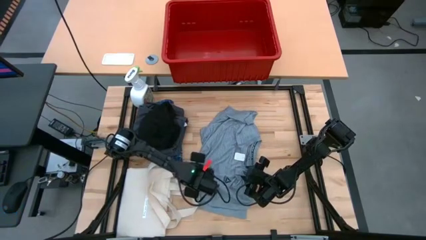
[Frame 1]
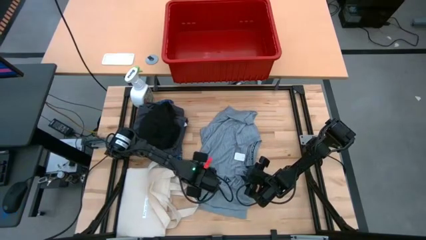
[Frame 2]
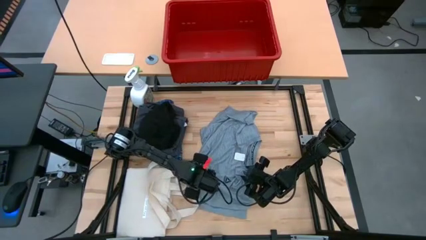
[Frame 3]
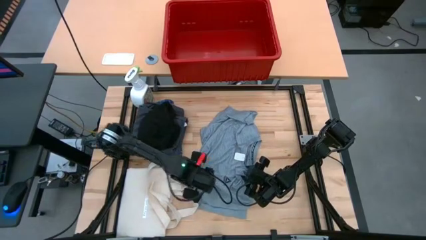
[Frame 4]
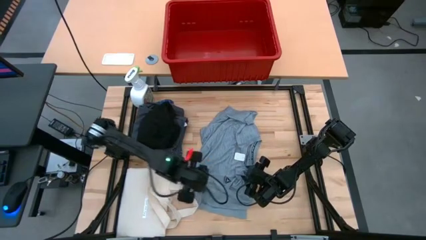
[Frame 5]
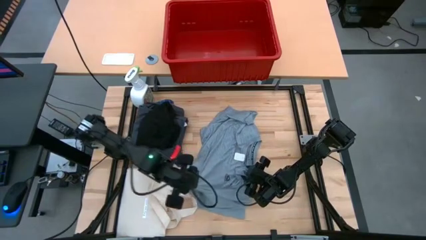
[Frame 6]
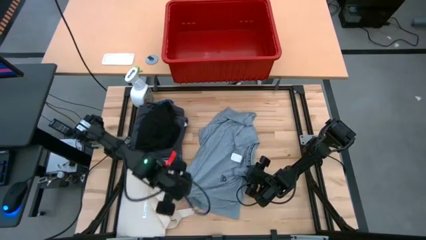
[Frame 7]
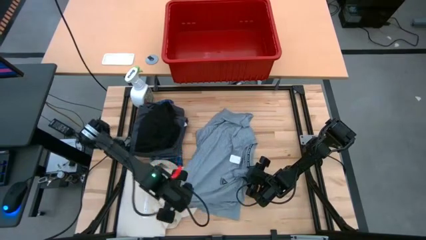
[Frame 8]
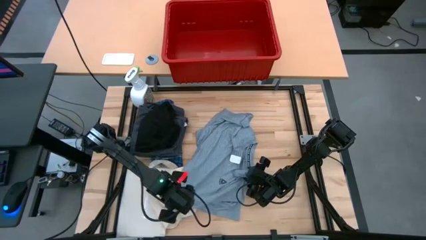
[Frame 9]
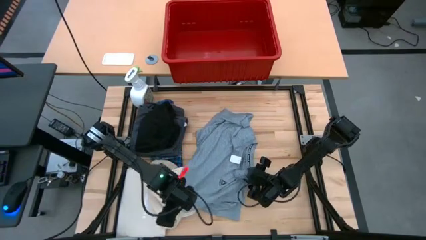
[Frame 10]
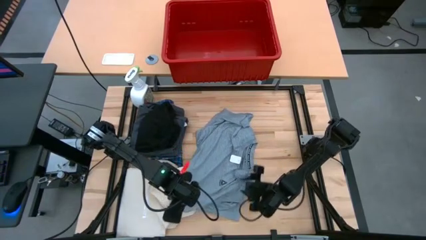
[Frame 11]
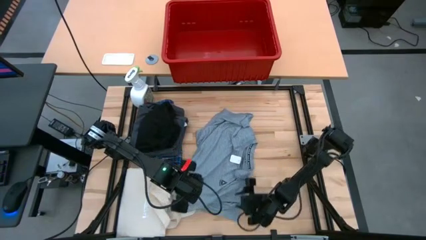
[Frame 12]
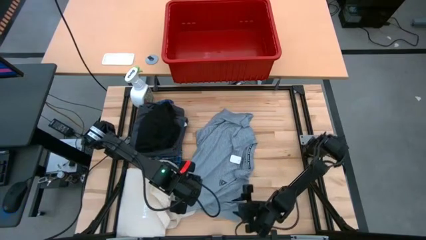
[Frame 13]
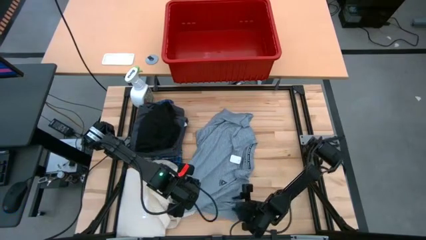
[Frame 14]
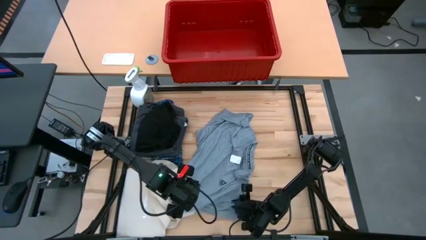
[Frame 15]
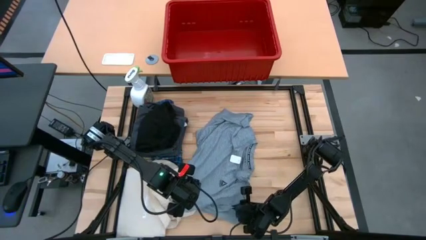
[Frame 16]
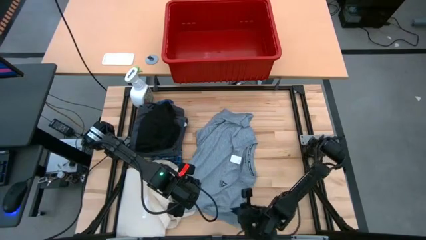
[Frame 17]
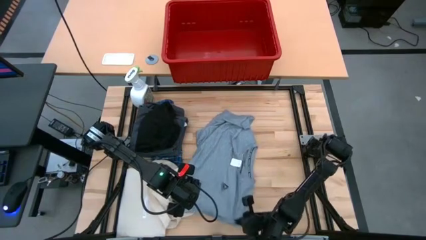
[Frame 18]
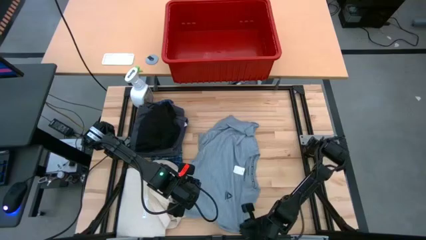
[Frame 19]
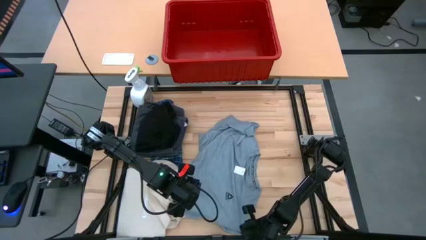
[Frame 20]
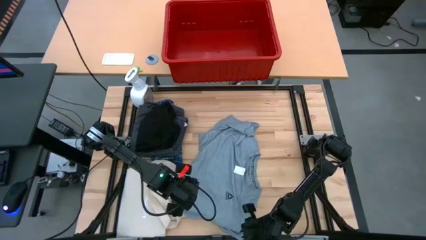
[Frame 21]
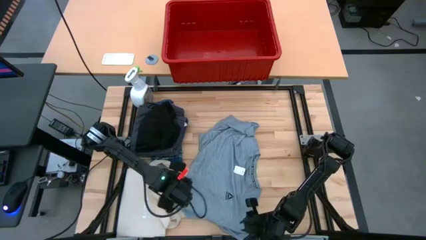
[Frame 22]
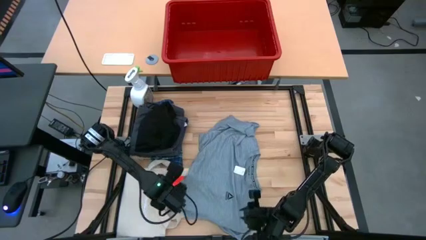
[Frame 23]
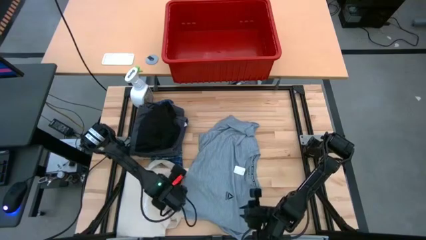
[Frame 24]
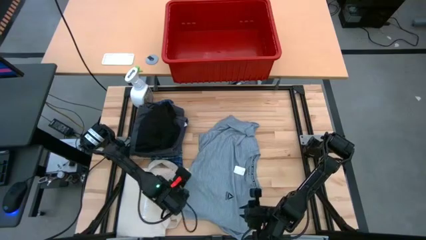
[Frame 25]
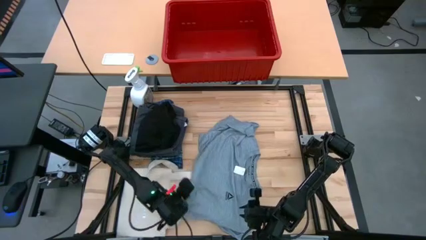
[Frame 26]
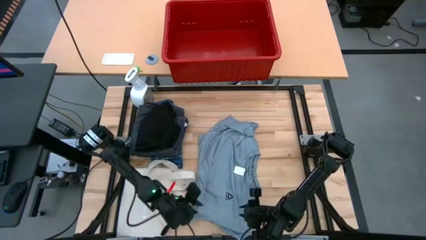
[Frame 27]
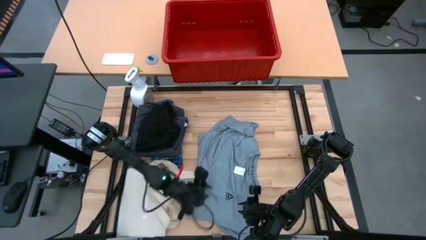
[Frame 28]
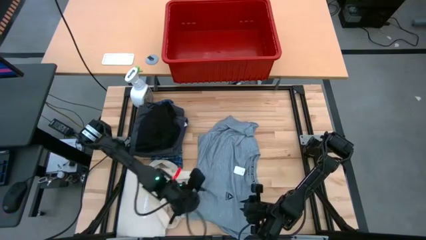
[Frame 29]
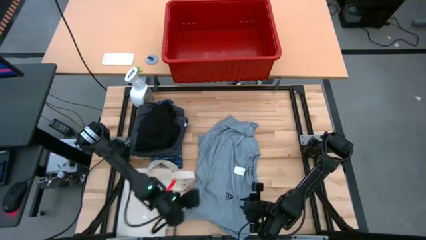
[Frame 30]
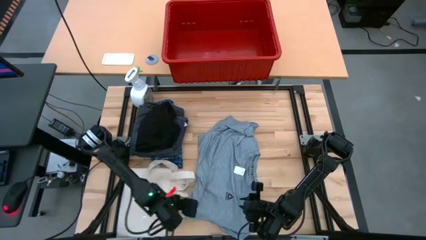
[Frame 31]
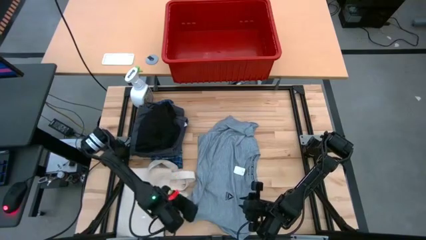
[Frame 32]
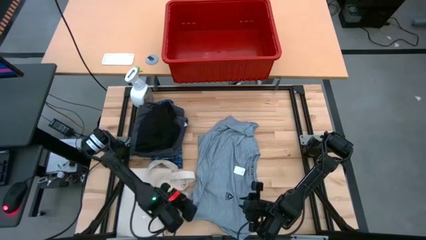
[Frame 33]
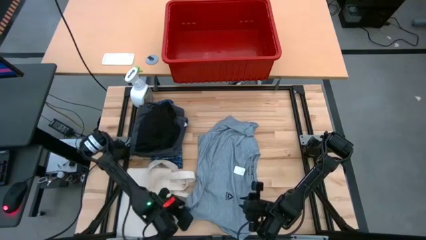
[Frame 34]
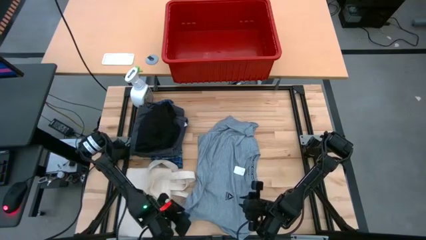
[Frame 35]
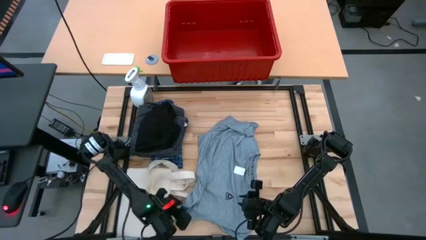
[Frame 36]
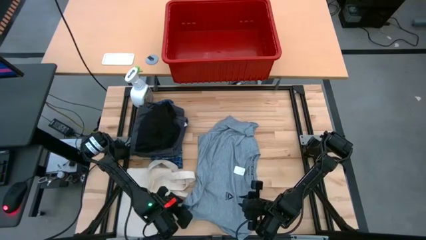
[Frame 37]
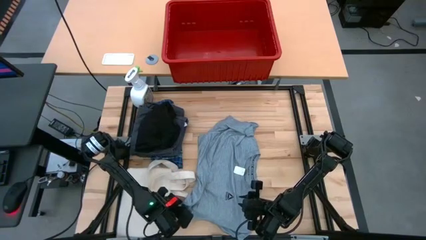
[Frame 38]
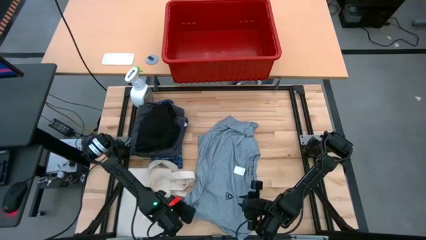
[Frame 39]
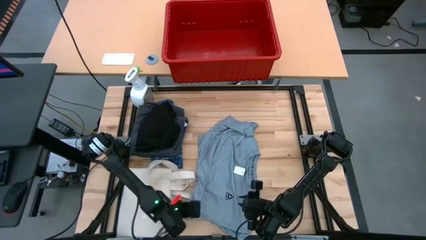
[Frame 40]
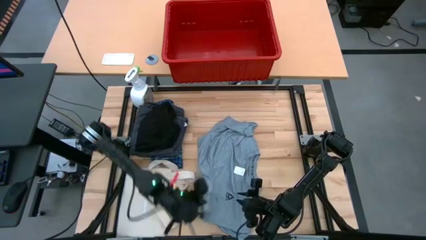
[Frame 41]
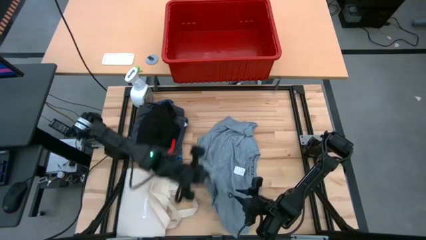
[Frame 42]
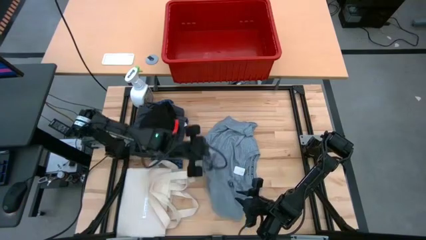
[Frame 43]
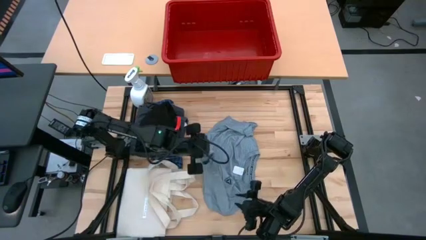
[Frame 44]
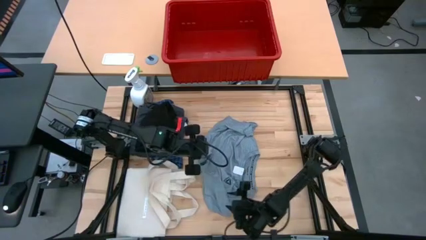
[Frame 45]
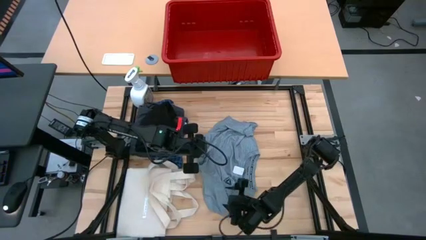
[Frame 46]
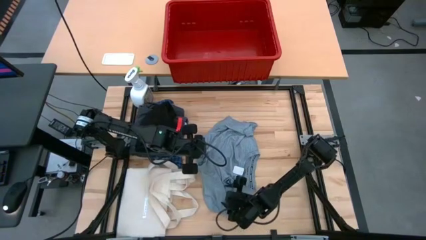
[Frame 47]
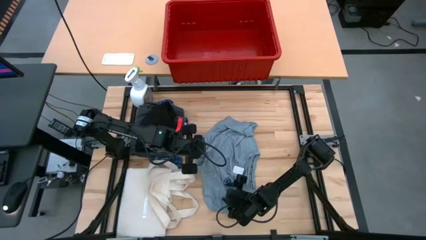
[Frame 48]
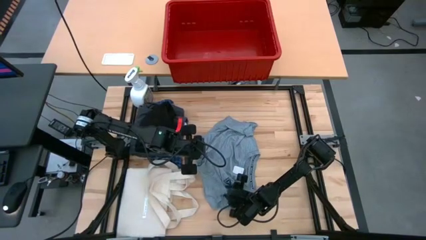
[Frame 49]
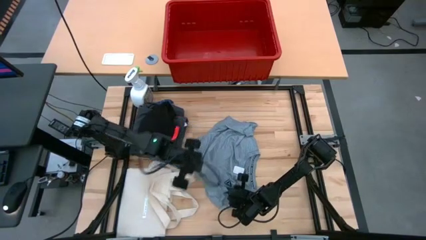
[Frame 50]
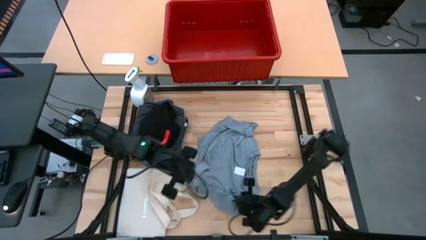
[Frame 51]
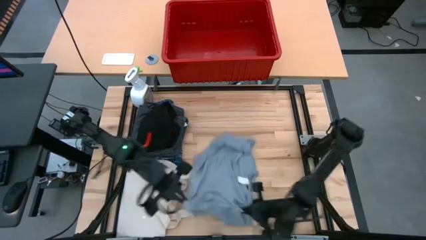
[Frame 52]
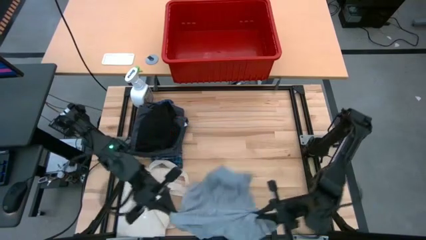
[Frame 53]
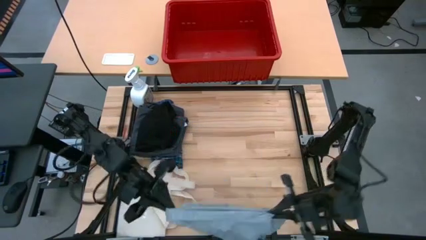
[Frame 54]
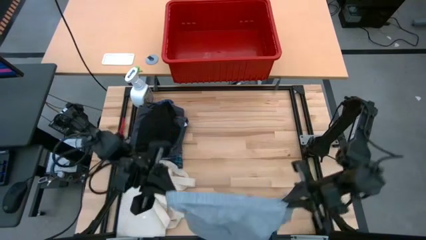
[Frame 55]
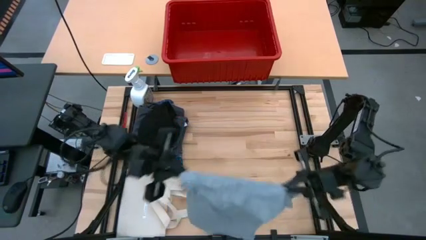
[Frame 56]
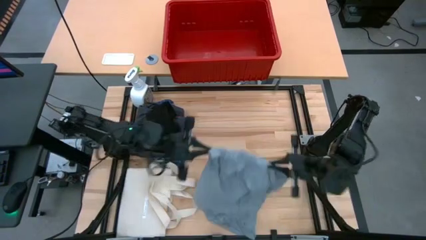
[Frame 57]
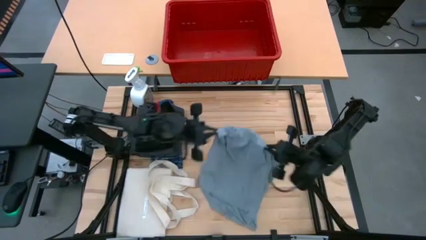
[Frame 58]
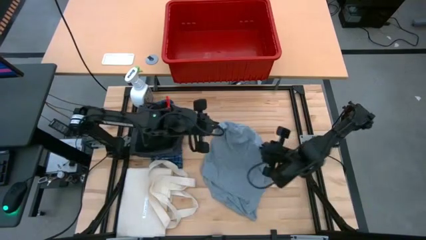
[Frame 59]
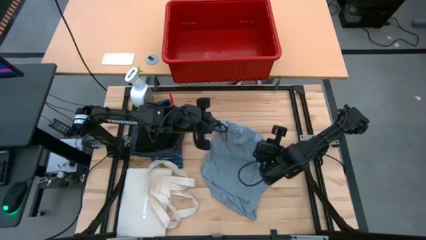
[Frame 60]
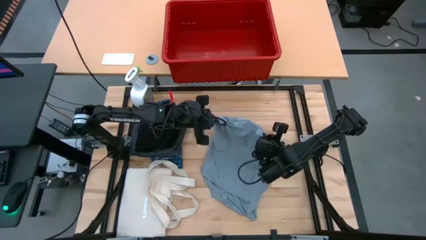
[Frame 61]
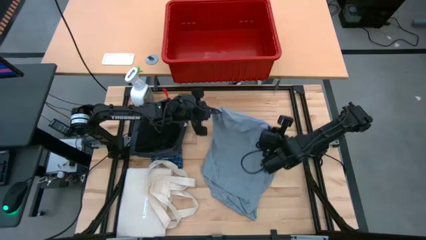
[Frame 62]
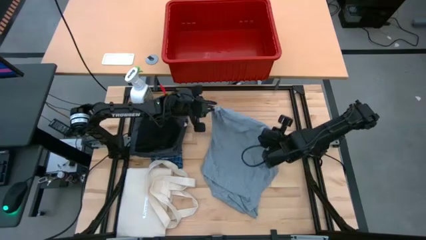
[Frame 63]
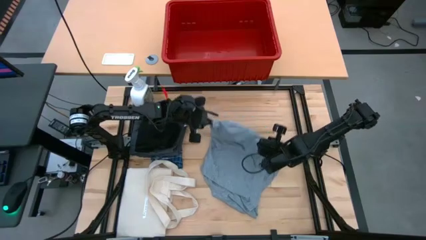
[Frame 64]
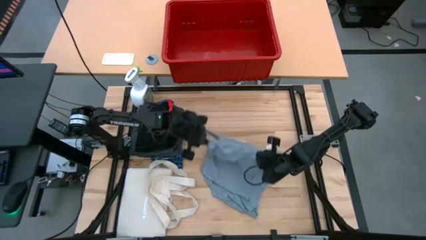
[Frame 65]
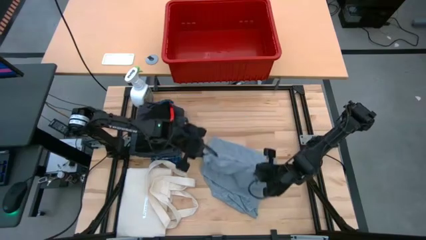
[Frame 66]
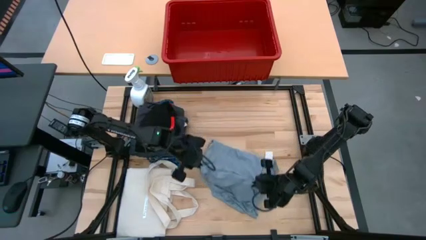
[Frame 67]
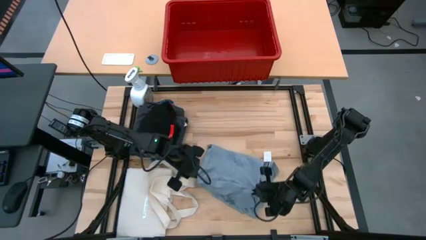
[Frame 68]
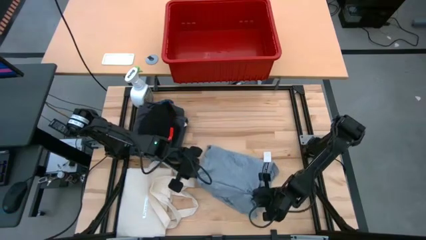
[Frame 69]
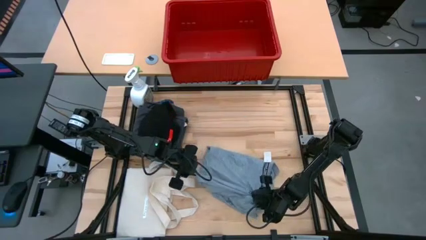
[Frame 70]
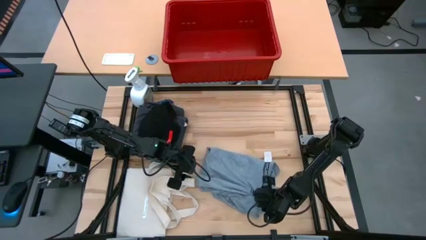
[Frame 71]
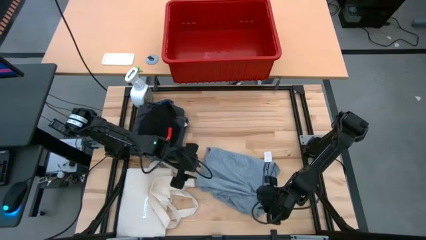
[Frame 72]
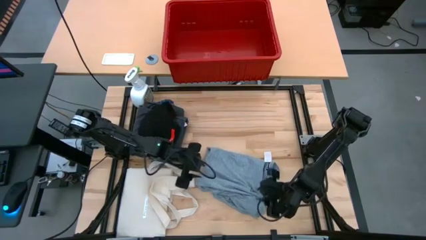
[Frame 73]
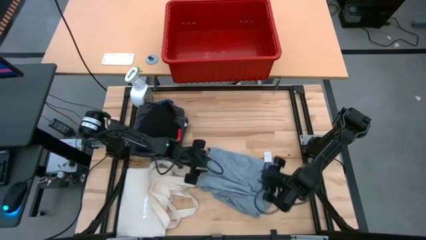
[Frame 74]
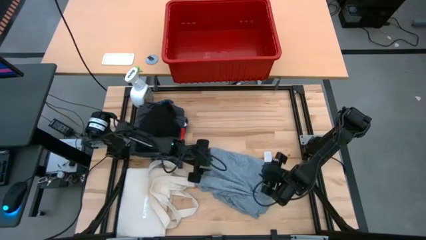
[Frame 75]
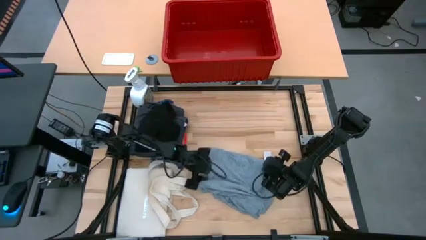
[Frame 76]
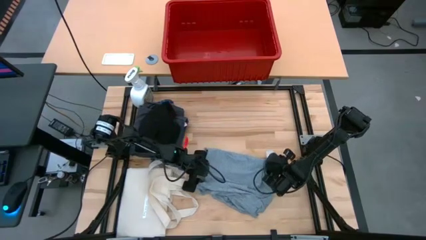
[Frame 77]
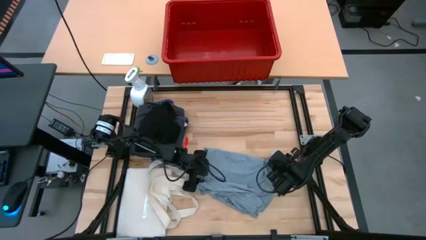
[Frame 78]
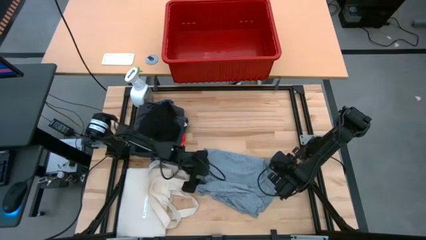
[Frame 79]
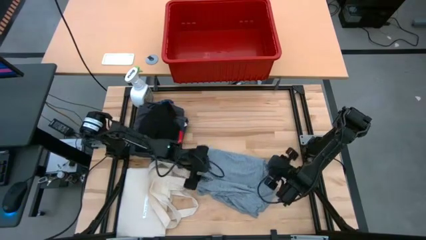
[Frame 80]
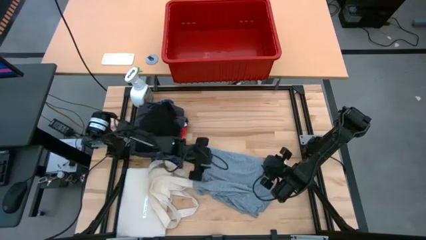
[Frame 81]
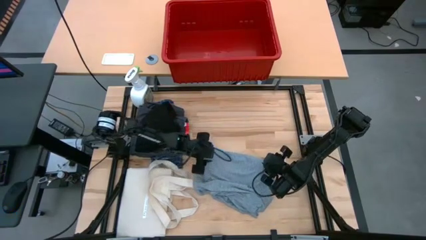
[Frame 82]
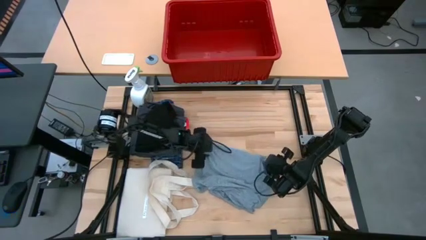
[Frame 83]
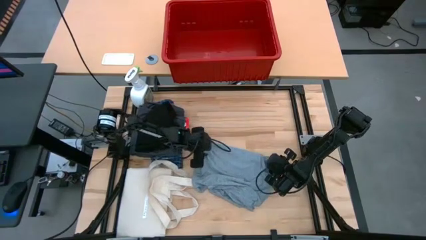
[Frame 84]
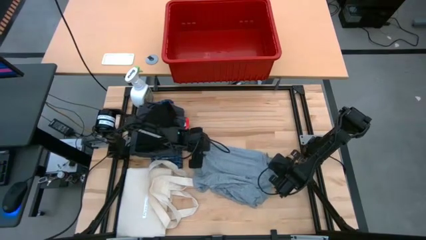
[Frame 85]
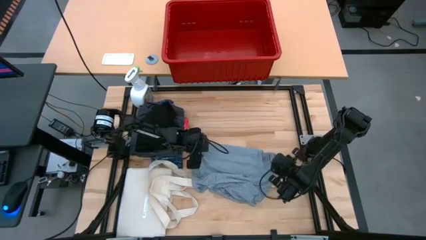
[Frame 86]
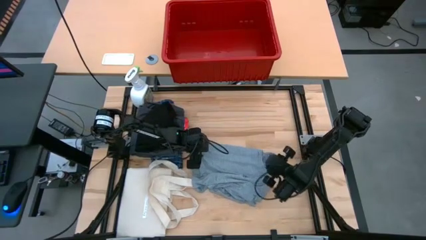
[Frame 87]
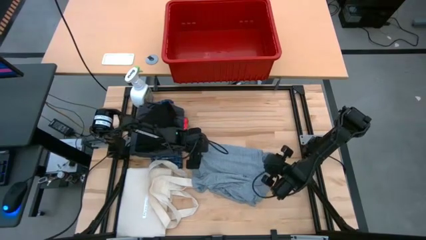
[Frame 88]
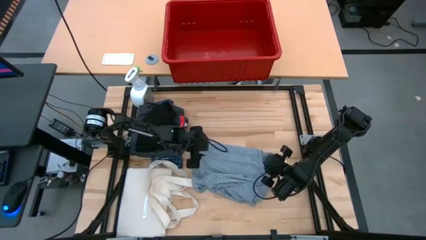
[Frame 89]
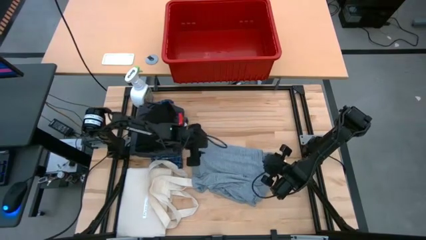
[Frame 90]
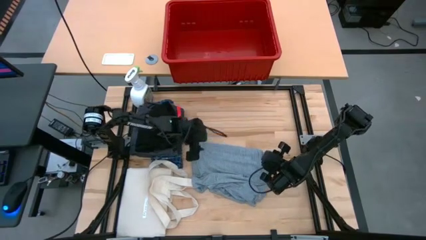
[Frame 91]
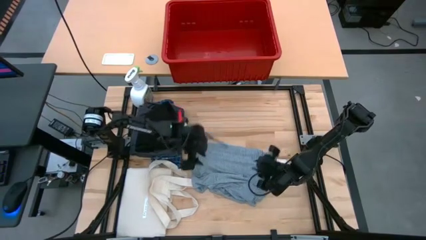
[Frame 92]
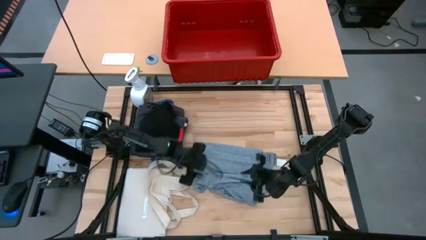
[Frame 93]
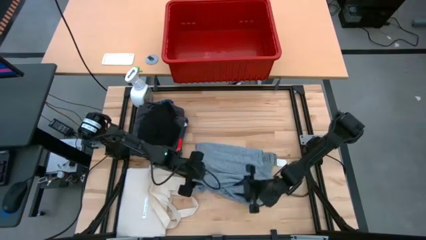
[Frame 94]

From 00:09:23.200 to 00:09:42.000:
Task: Fold Laundry from Bin
Fold the gray shirt
